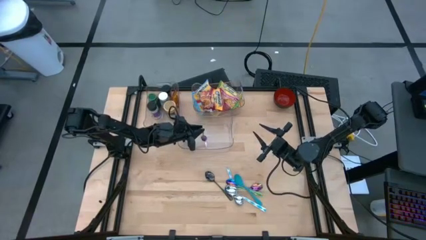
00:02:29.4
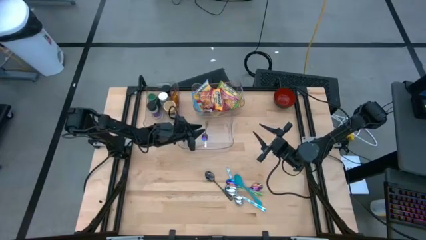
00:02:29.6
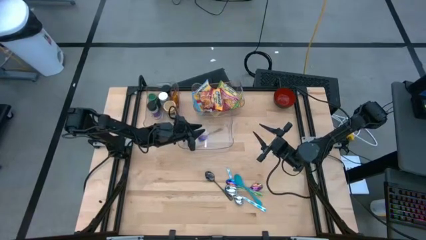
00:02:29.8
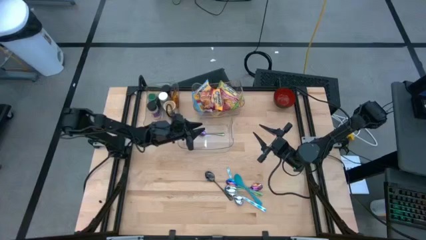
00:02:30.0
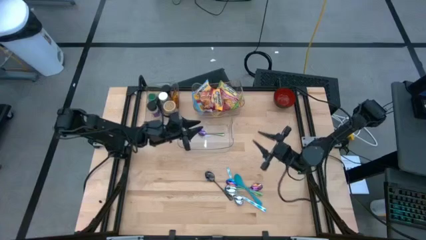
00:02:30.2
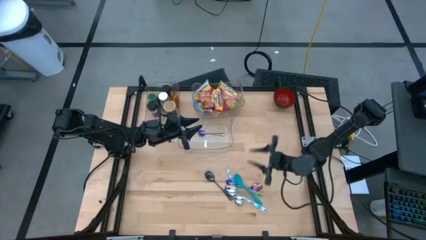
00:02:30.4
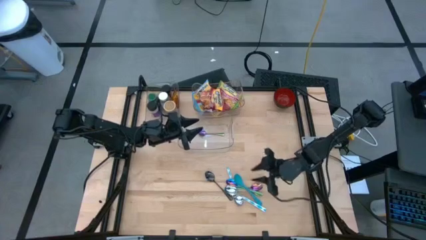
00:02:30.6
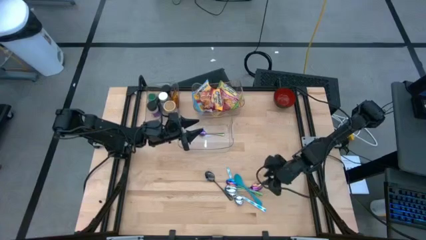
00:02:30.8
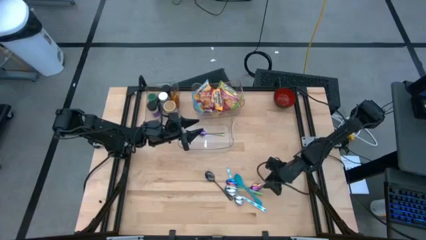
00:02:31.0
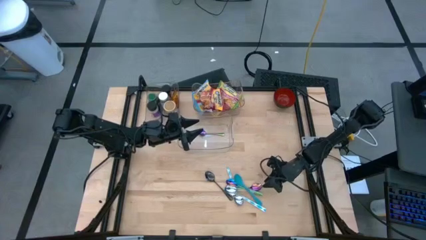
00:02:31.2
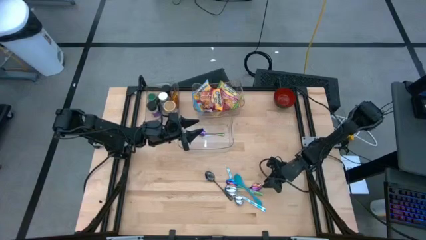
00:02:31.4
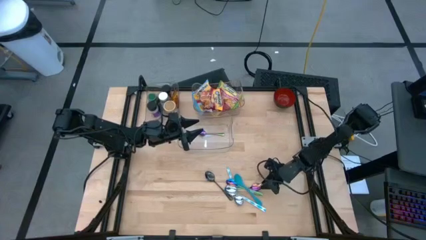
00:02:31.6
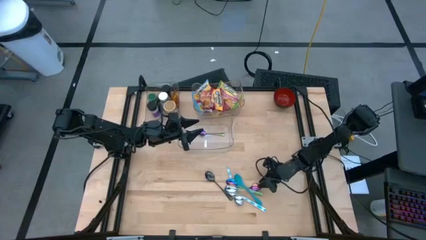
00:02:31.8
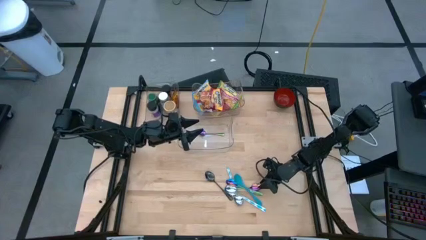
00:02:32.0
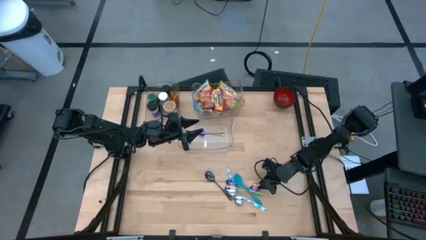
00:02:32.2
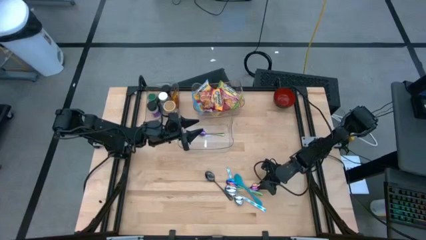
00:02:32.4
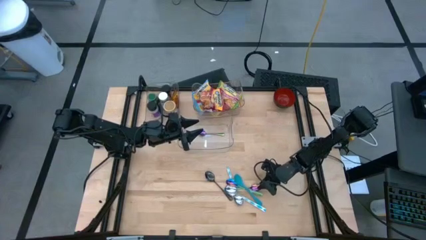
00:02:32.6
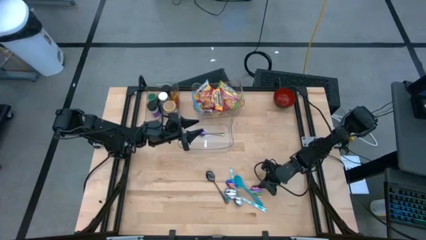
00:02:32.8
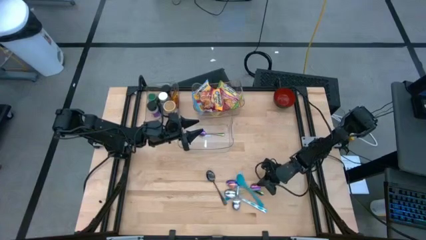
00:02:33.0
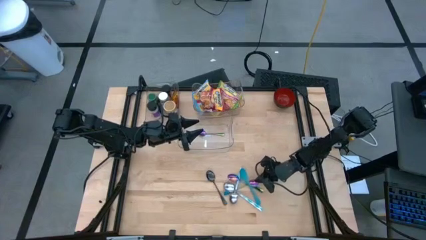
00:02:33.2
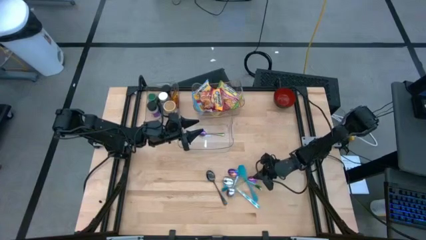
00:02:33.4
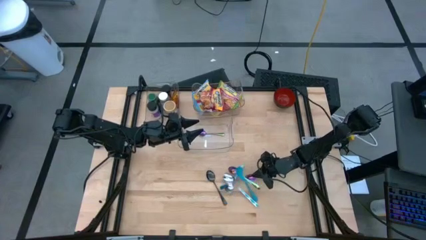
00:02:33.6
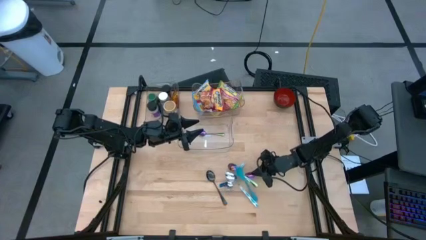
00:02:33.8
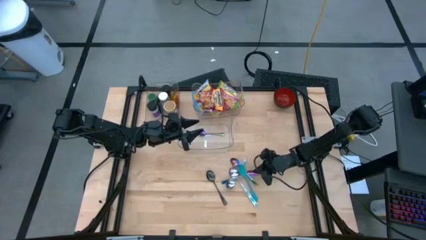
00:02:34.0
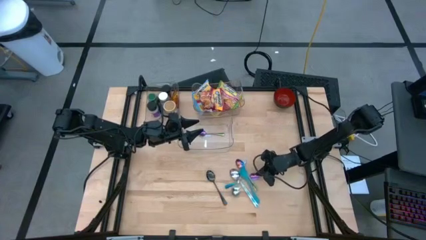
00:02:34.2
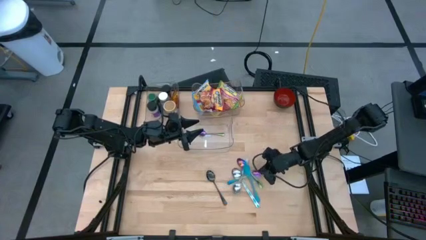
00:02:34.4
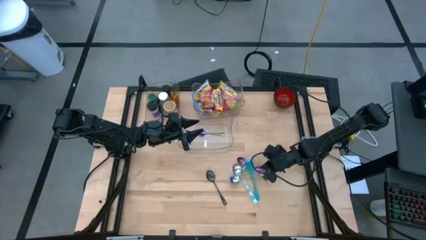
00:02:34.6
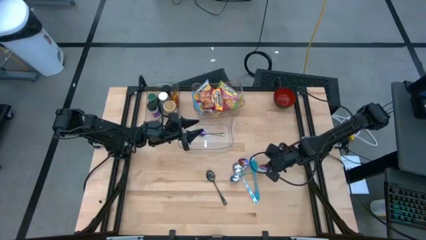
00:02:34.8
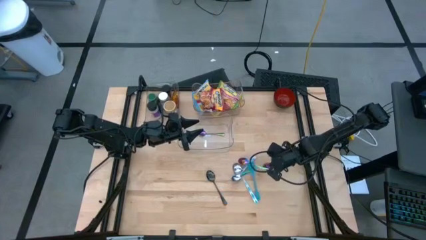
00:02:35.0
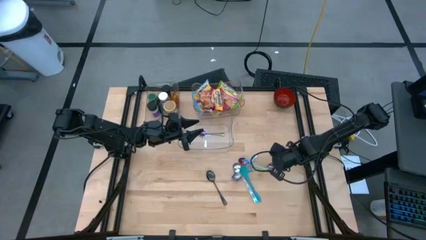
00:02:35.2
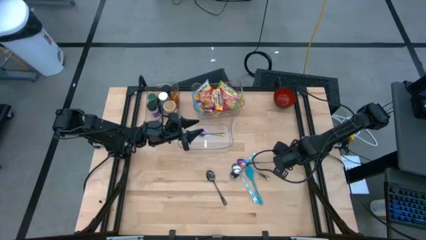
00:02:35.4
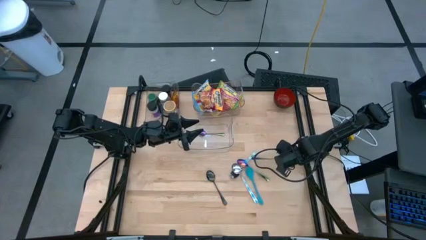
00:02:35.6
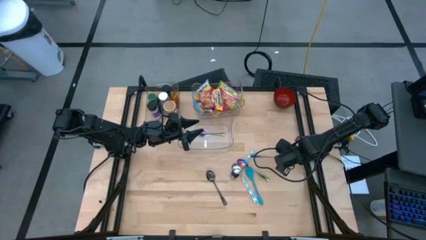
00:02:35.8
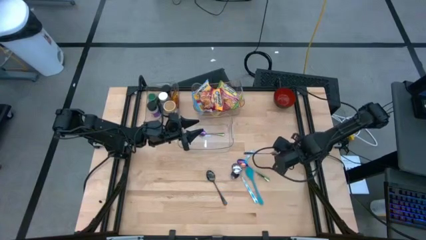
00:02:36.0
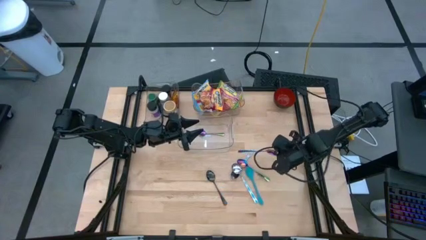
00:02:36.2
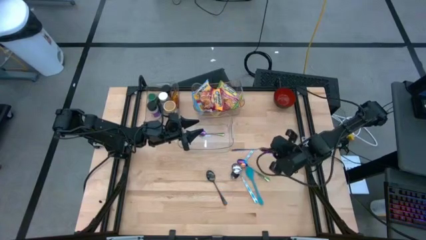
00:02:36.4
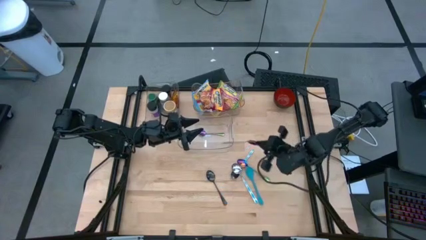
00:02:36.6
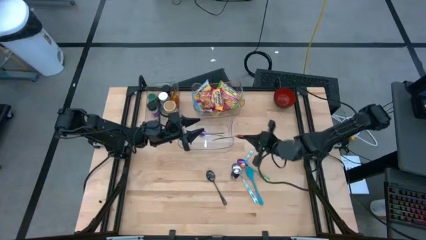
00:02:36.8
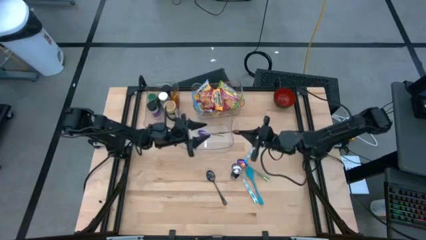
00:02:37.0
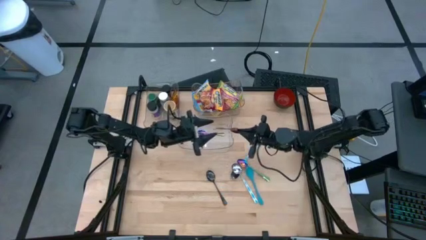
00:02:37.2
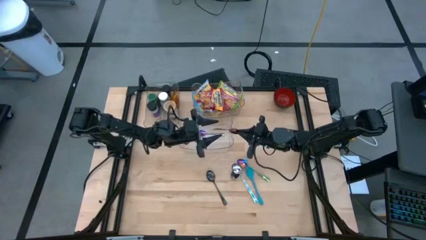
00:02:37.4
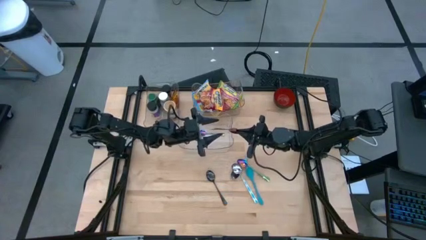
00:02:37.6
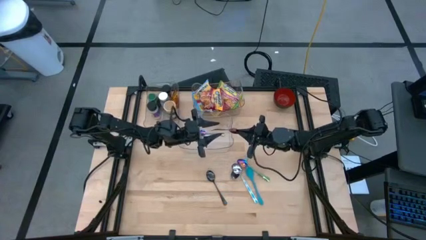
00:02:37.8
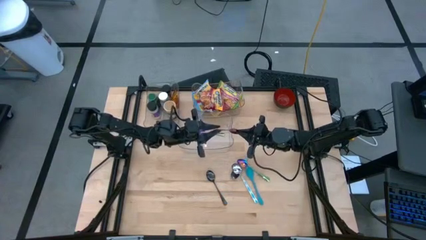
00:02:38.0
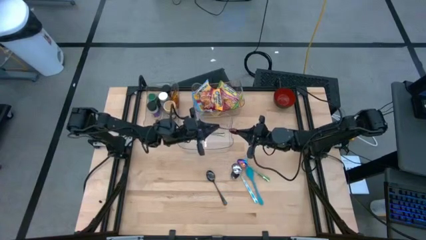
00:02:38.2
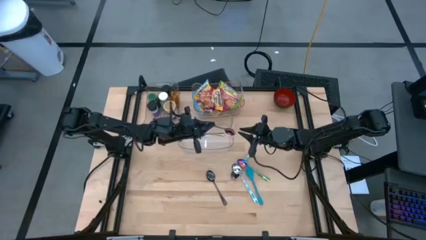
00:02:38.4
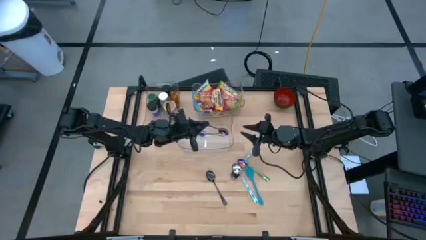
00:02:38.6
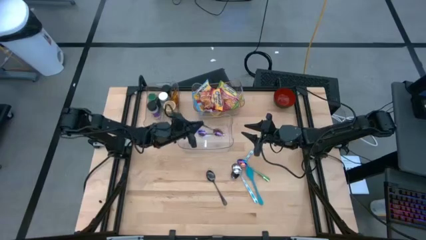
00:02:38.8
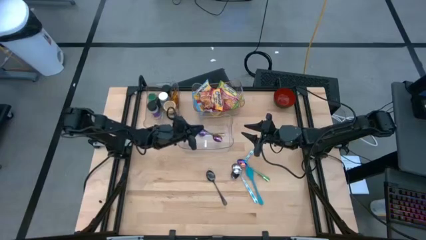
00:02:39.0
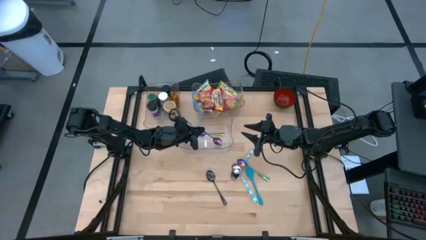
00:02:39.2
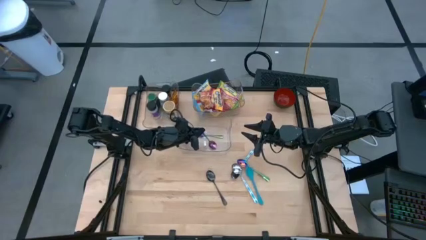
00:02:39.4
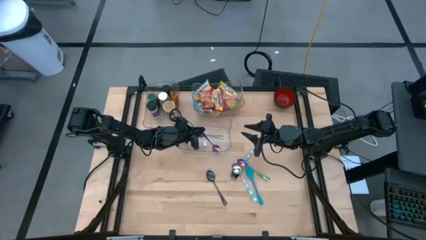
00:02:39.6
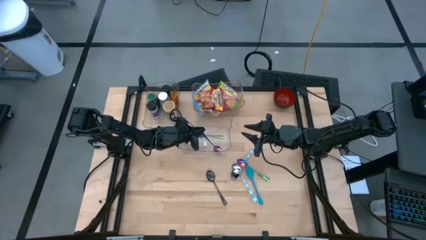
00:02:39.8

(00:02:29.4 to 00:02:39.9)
Task: Pick & Place Food Item
Put the right purple spoon into the bottom transparent bin

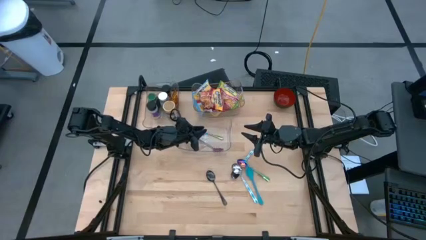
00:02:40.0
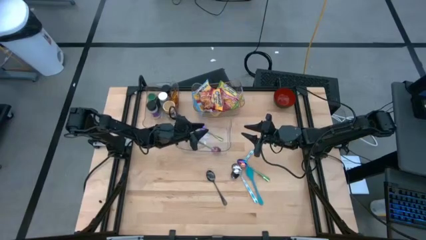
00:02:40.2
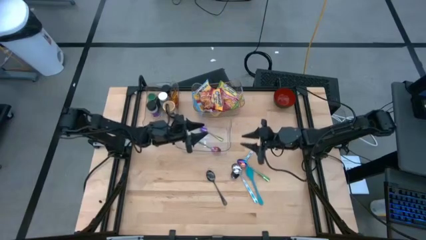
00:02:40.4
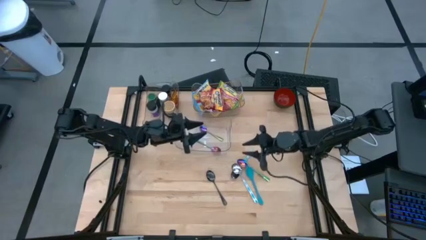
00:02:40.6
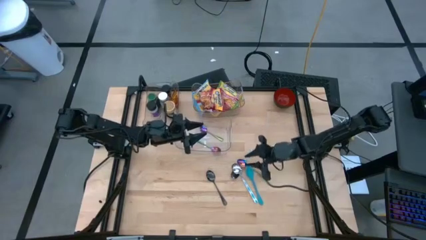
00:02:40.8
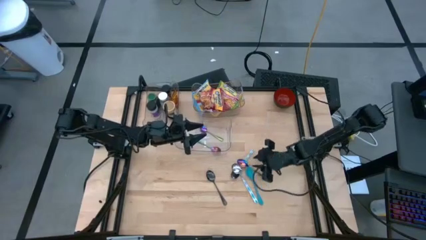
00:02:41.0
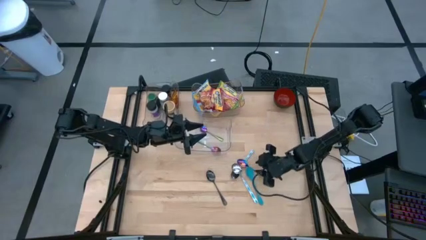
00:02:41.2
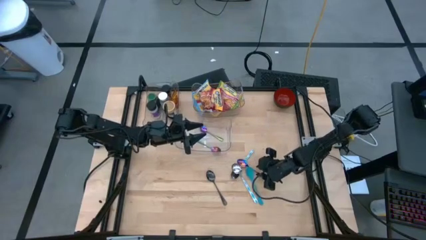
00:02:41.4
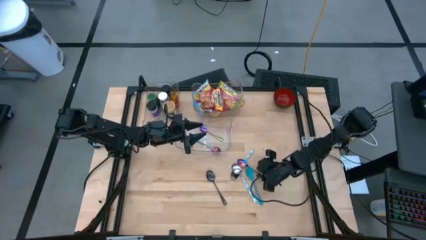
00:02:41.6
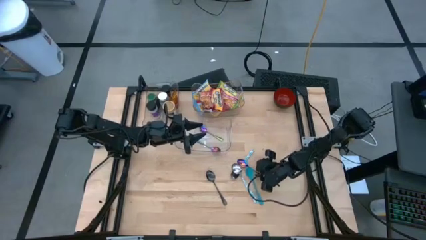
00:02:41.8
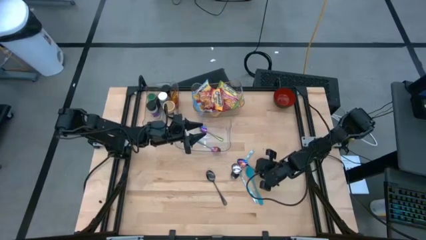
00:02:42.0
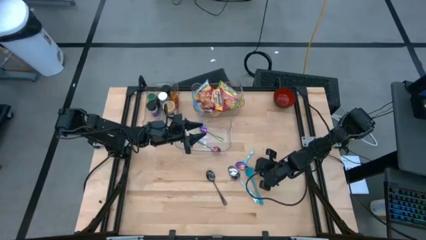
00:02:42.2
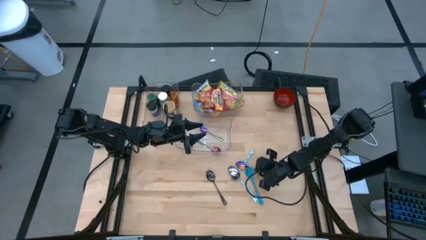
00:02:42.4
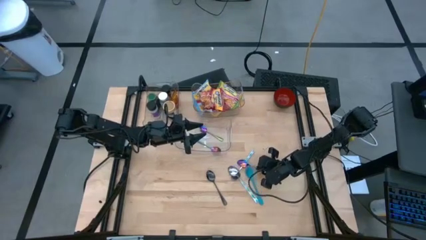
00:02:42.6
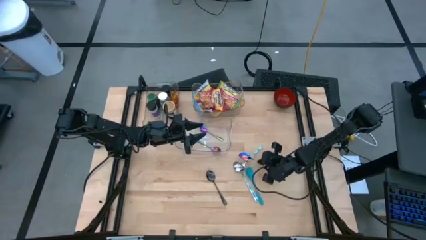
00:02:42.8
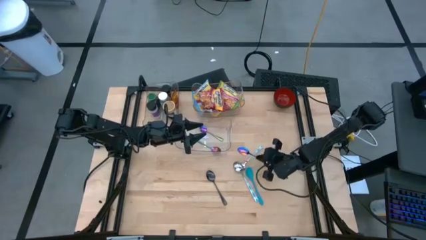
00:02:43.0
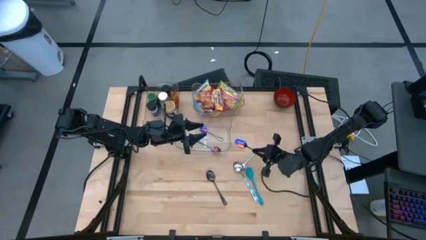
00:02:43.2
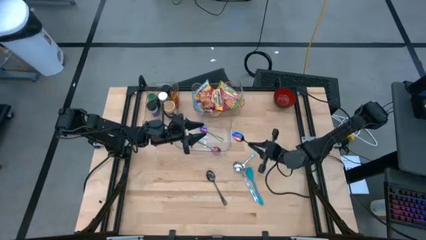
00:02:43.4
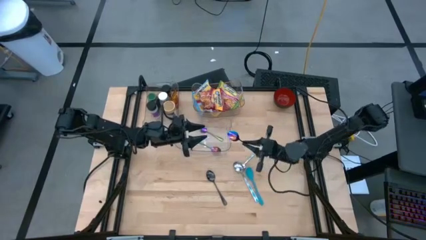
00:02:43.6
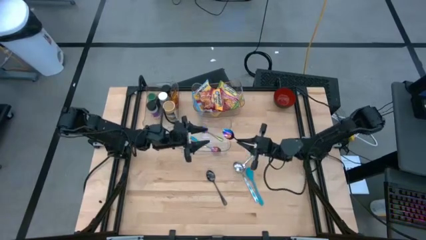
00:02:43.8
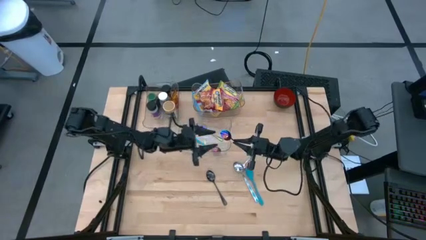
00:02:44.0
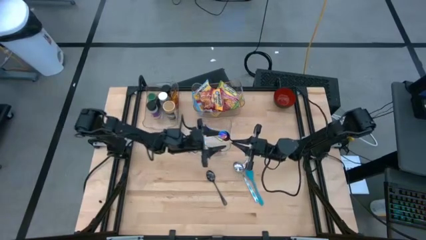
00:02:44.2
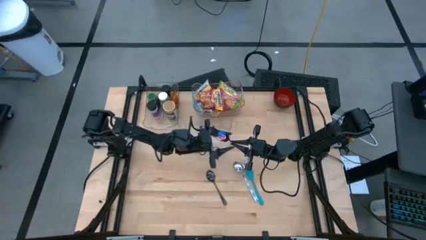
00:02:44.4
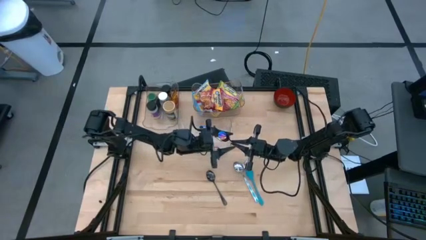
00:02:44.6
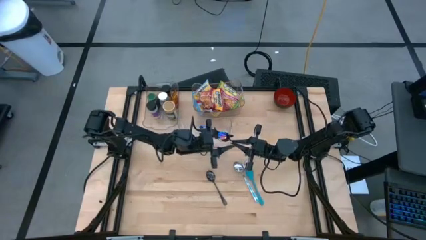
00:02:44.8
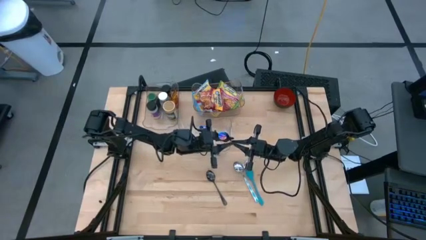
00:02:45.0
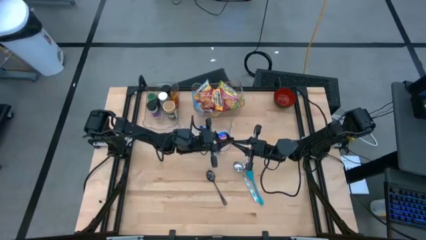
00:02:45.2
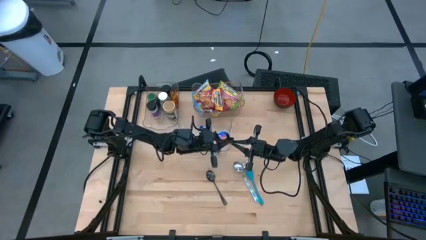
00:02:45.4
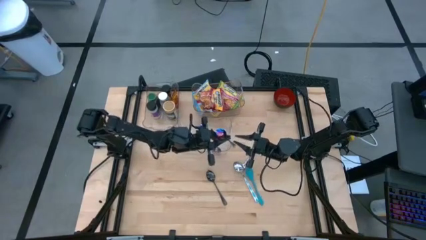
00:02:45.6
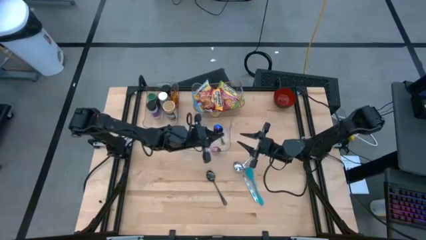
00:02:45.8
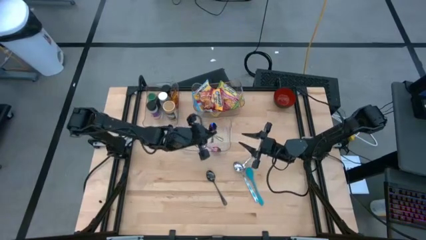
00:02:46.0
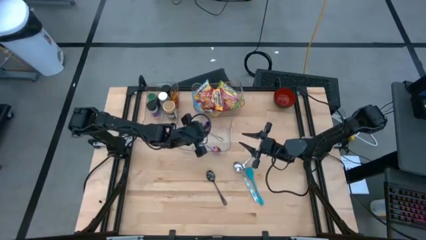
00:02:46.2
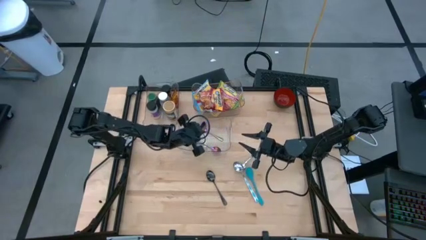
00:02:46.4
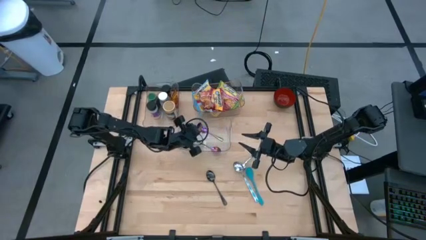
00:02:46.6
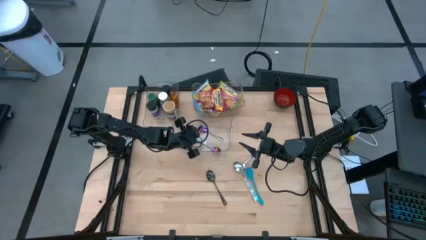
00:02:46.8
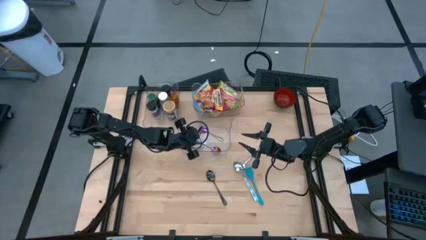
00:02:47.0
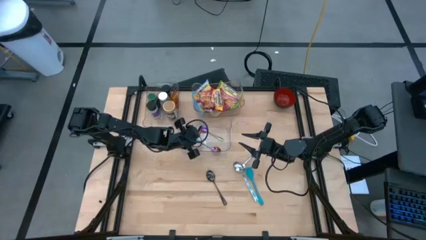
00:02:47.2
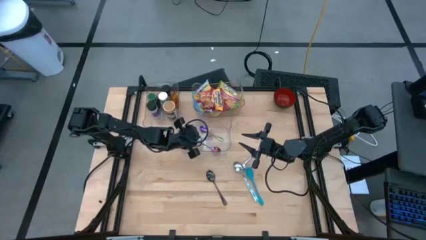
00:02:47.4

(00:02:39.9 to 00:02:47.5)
Put the purple spoon into the bottom transparent bin
